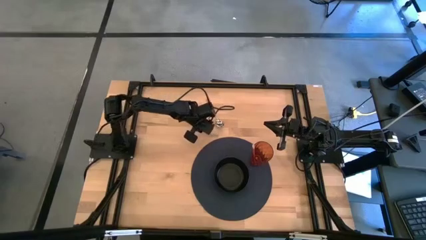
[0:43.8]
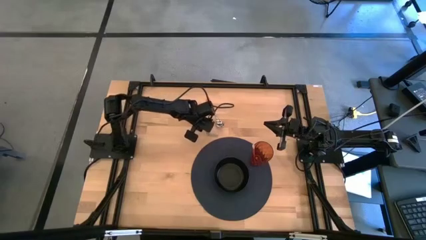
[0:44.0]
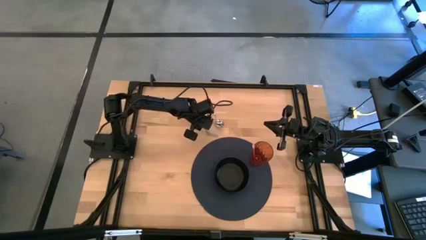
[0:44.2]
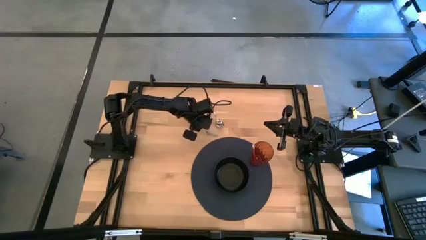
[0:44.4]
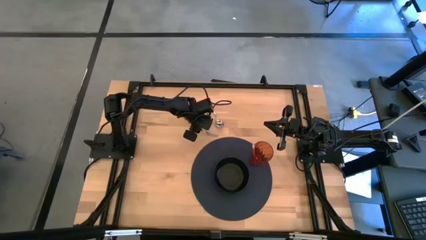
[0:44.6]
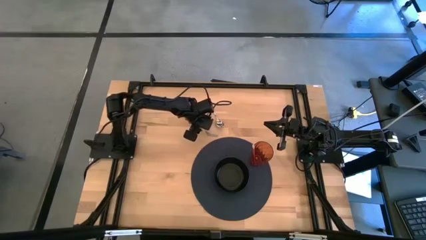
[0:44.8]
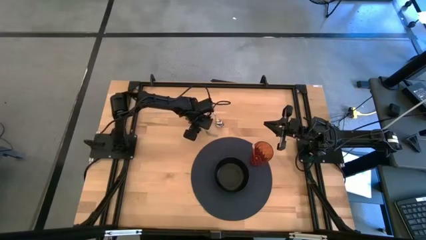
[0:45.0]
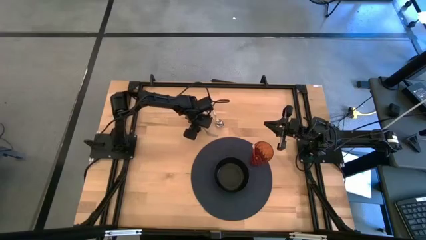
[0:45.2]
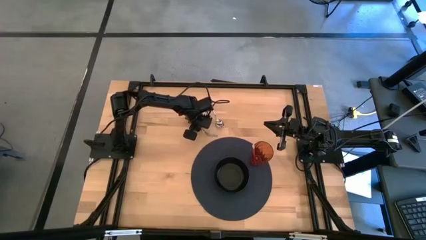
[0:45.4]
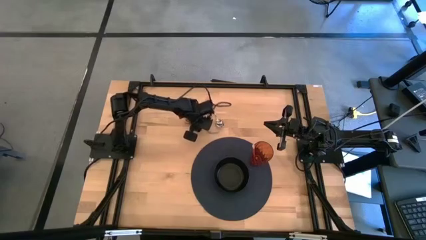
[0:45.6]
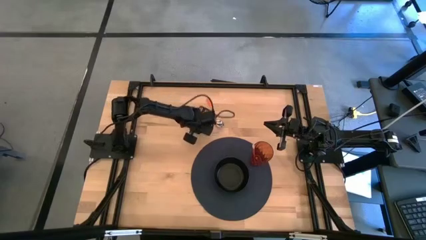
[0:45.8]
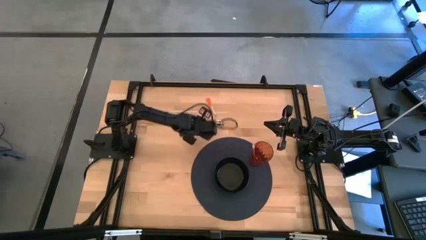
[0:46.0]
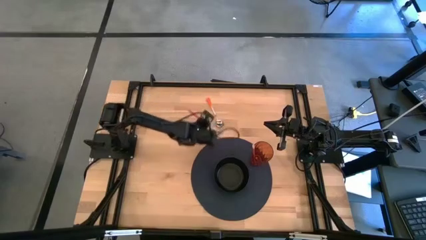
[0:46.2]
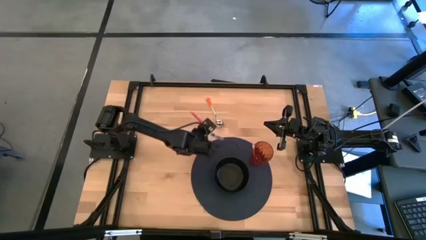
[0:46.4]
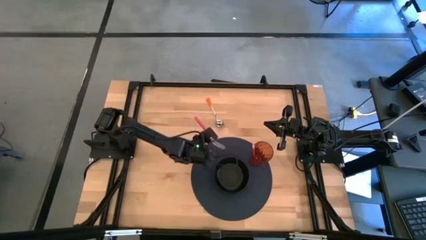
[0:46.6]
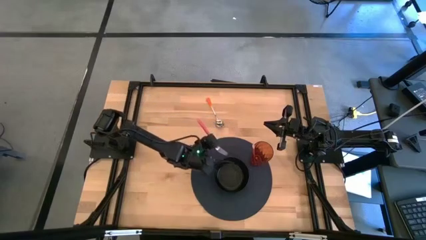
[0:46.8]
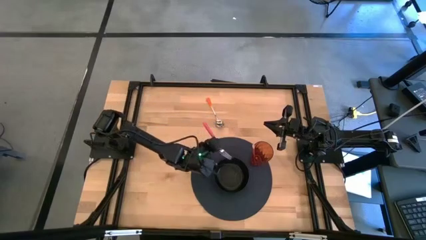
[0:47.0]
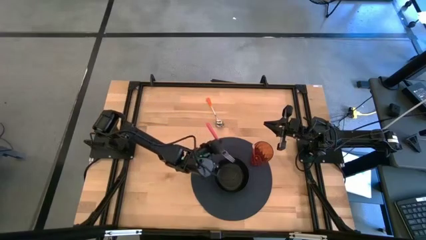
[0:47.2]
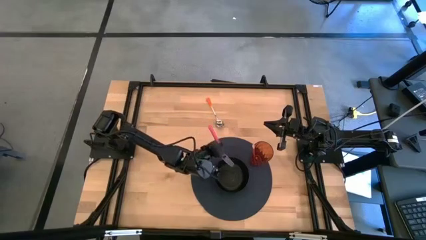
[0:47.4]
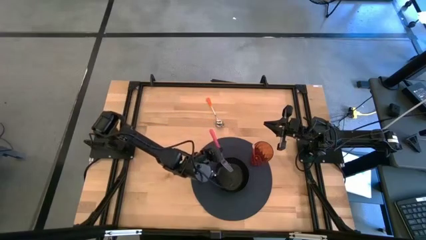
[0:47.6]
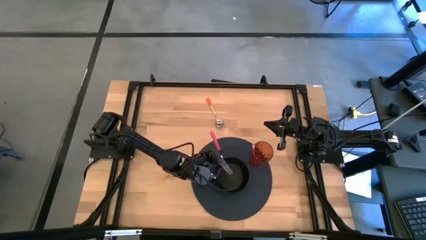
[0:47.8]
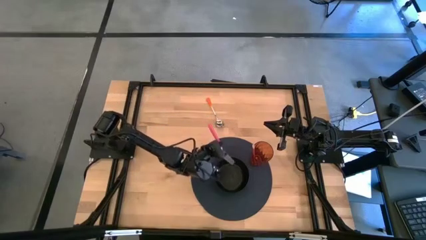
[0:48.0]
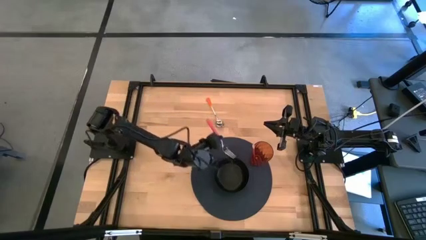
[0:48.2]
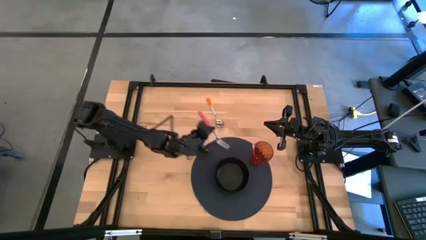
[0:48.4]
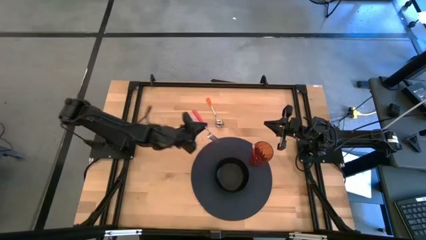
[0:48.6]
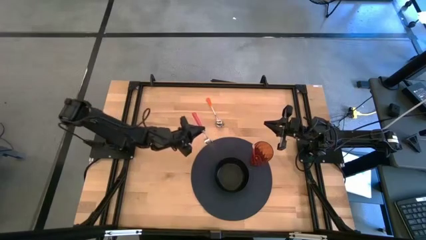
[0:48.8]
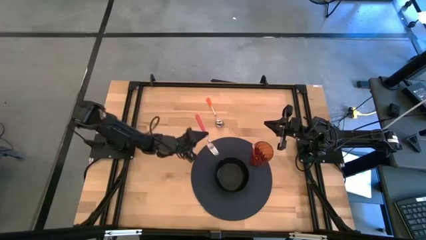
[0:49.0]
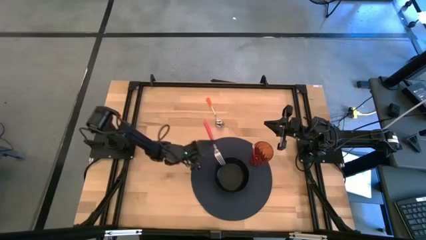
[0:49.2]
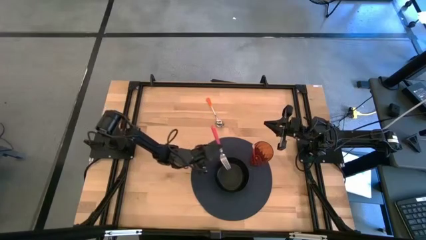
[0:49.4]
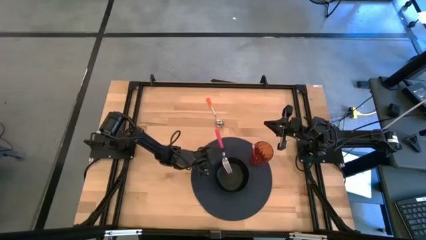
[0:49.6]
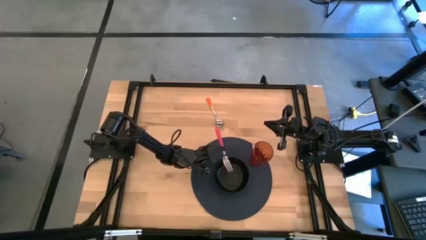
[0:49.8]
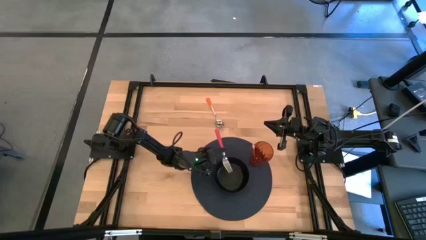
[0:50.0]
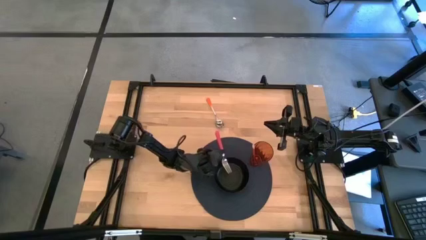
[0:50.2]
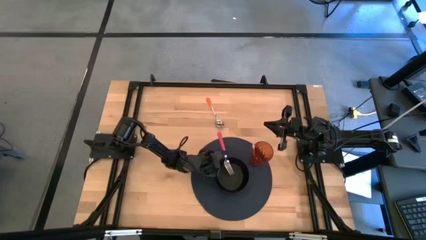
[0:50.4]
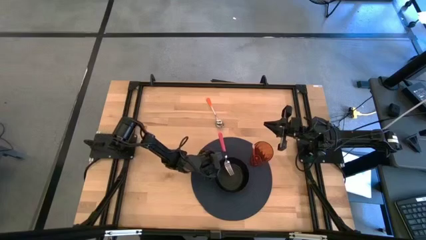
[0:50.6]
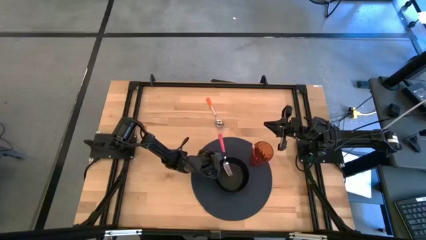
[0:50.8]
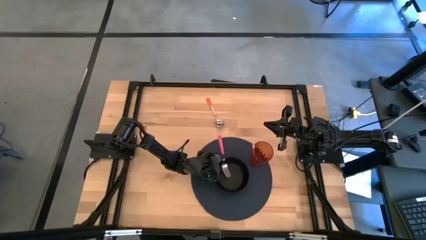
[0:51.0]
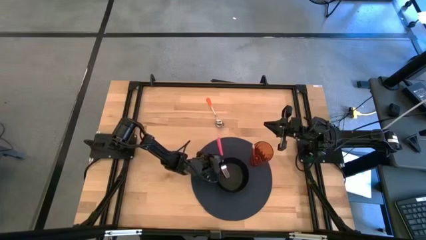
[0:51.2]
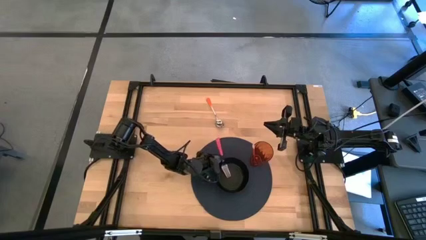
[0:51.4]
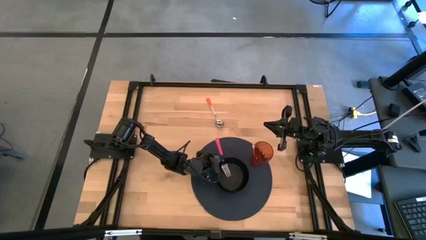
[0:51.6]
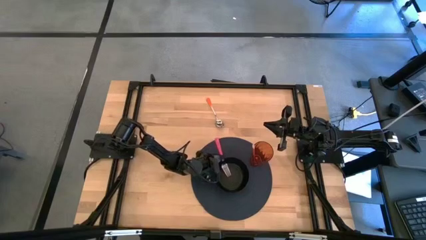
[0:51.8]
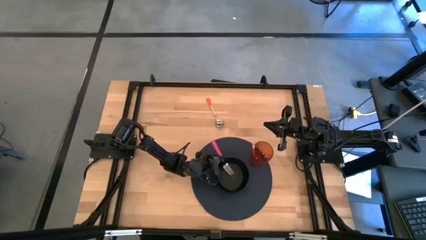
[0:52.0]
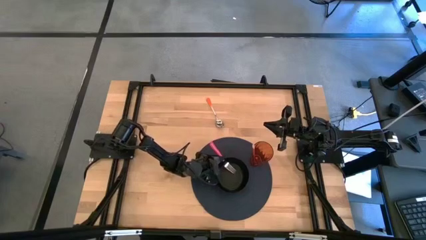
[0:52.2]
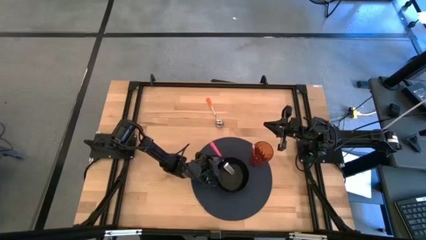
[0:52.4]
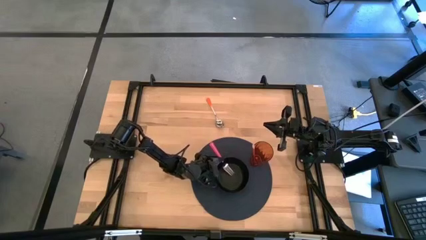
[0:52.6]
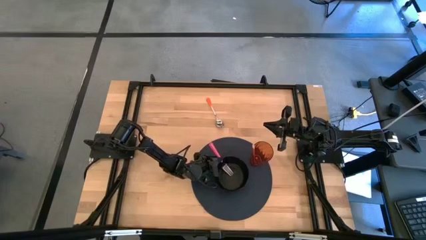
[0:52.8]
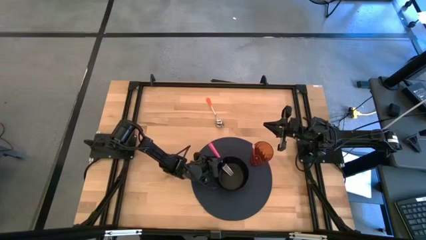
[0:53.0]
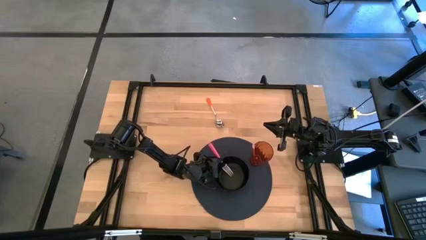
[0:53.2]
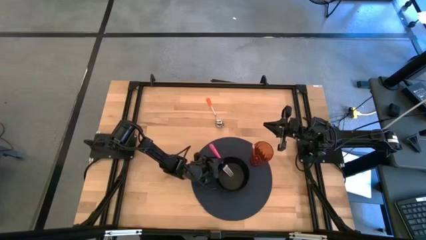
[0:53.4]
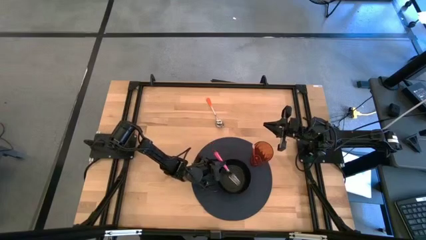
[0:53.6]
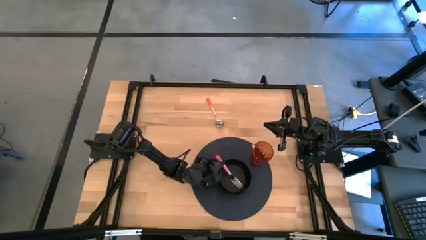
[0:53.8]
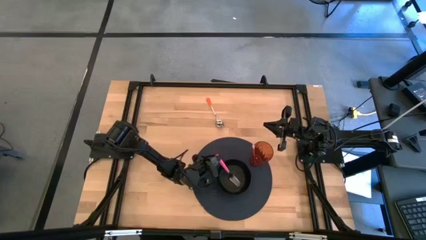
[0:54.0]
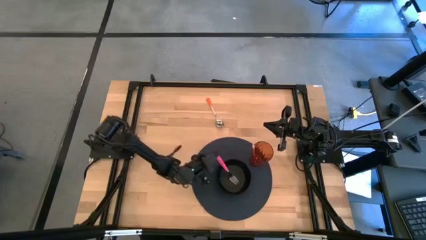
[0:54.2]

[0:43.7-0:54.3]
Task: Pick & Place Utensil
Put the pink fork into the black bowl on the black placemat

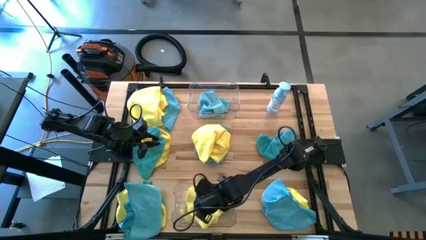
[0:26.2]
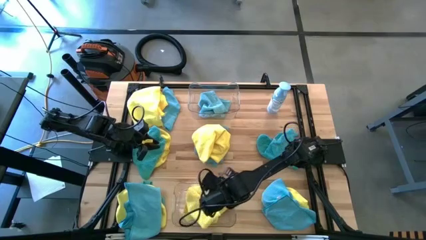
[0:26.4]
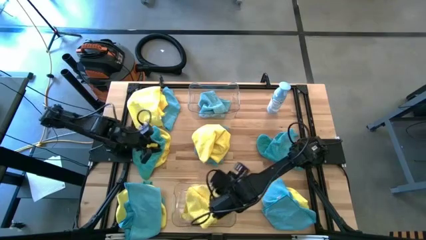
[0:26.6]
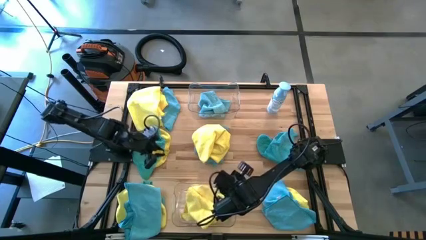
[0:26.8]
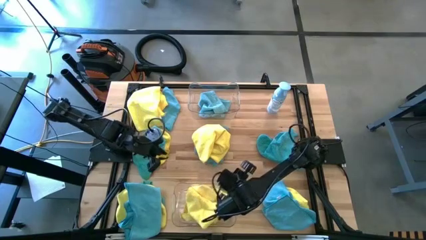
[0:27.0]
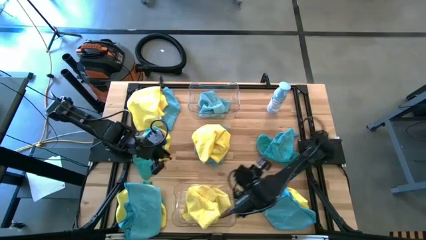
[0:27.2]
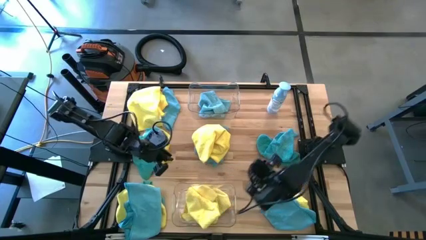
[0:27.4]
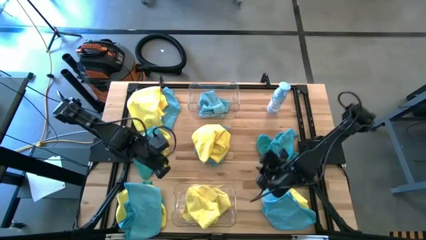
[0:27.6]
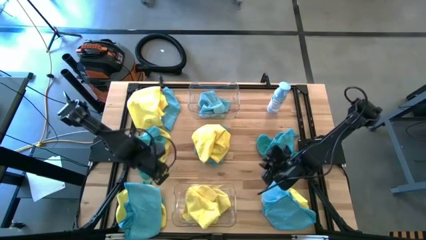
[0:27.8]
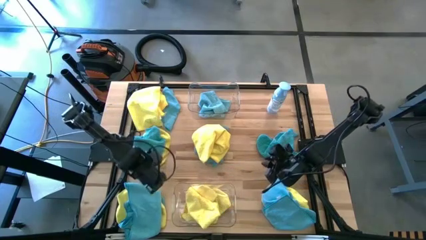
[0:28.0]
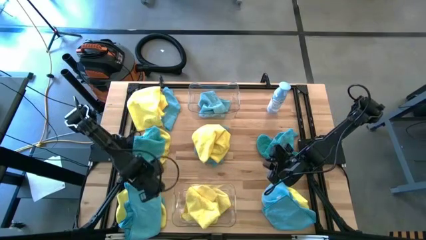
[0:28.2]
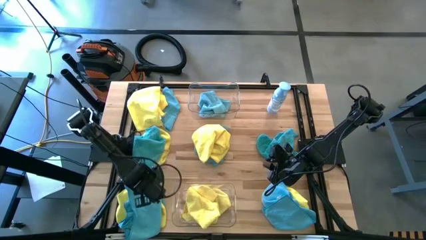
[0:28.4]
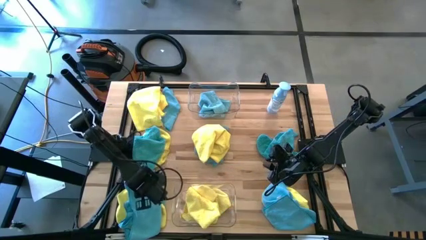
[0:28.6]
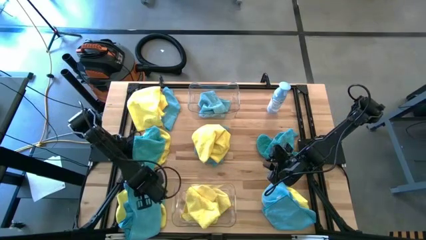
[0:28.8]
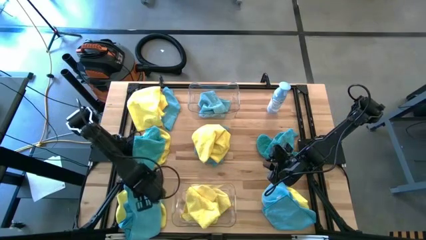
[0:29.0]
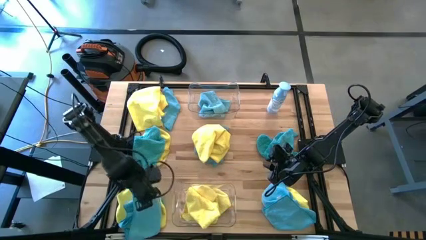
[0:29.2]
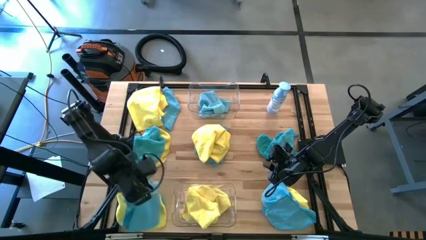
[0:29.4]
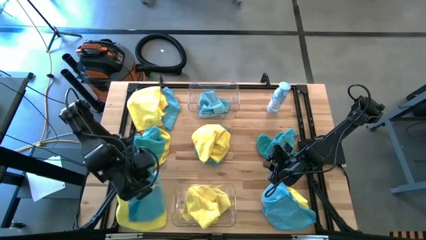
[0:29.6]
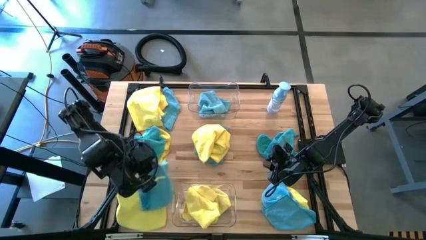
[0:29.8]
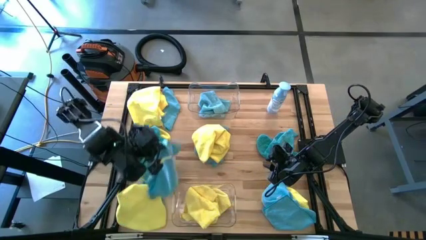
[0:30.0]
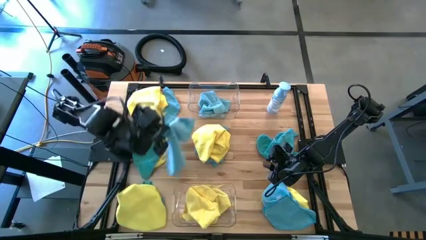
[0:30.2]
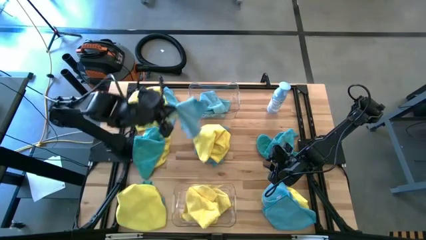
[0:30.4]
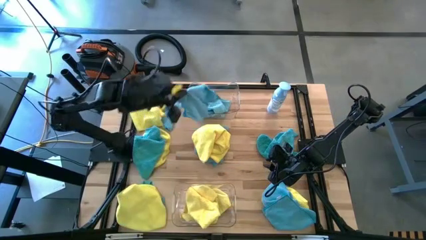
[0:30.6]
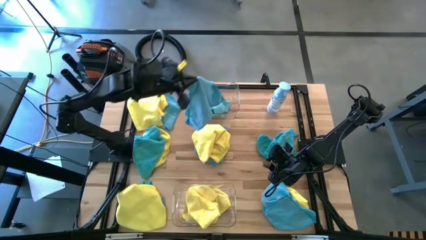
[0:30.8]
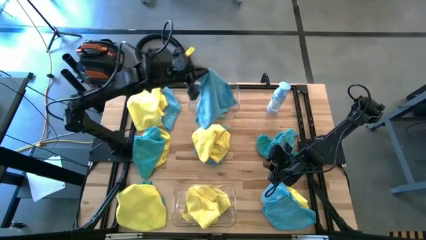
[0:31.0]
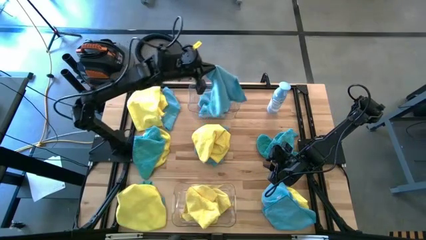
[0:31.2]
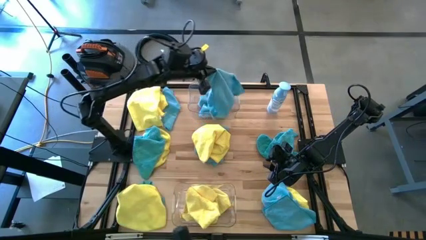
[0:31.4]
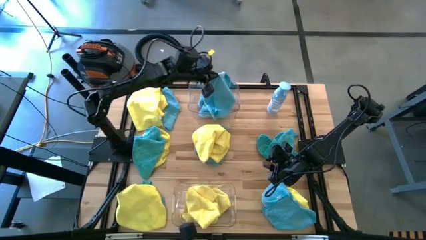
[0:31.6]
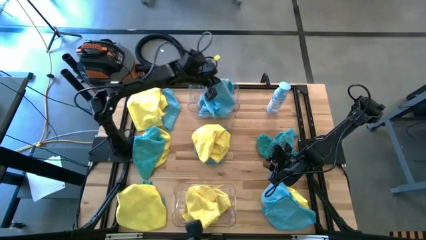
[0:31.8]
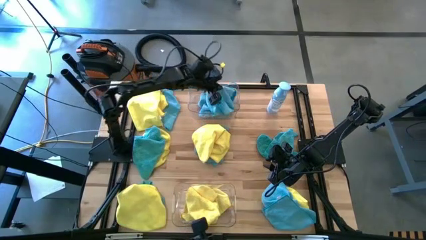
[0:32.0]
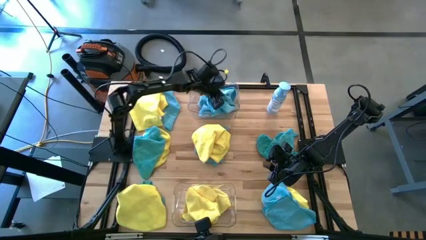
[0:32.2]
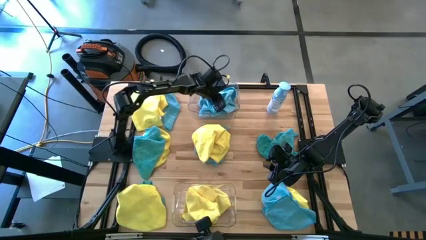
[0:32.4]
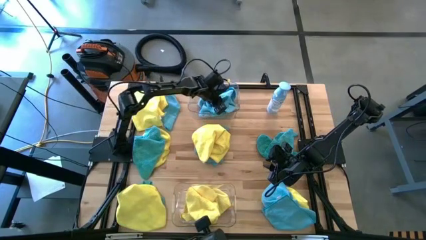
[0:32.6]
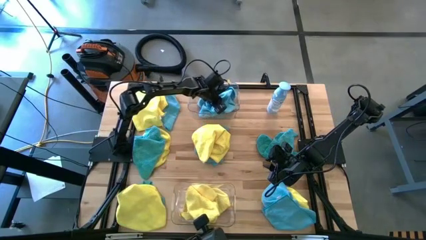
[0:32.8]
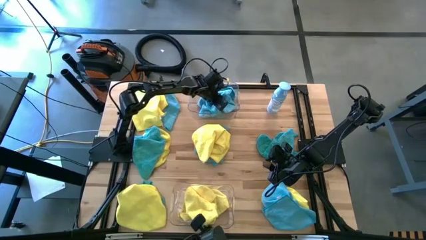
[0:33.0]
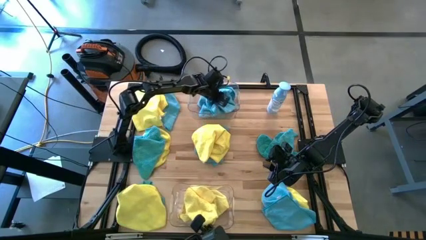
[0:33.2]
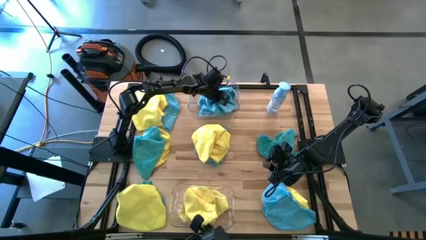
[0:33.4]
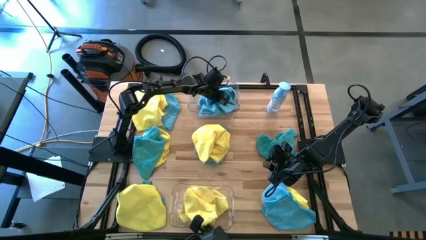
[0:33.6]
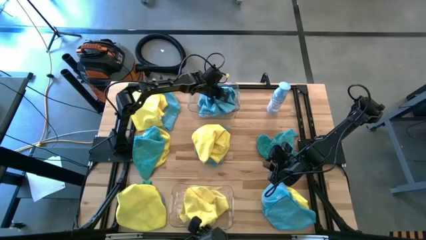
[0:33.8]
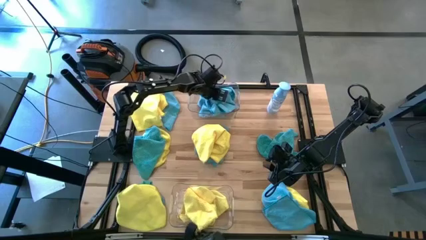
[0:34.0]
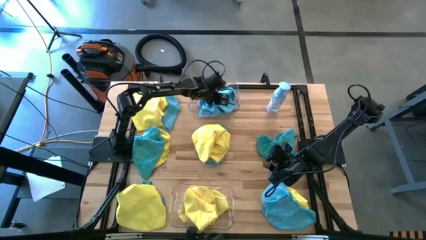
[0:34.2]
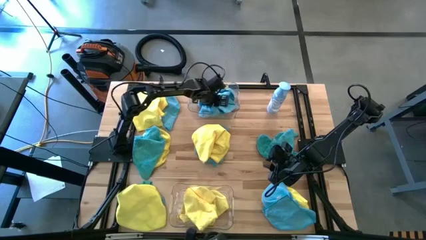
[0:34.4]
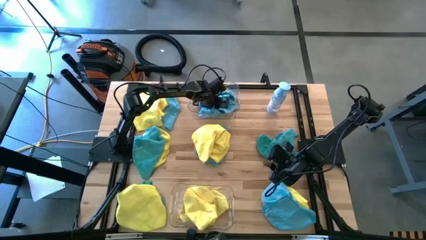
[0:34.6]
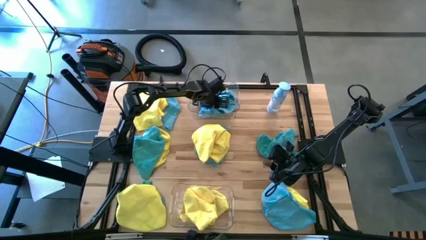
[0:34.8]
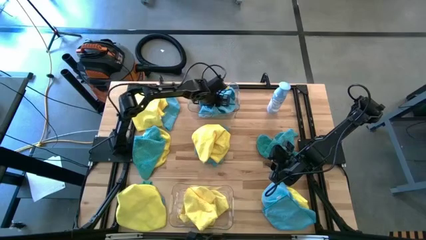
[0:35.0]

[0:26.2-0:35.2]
Task: Sort microfiber towel by color & place in baskets
Put the blue microfiber towel into the top transparent bin
